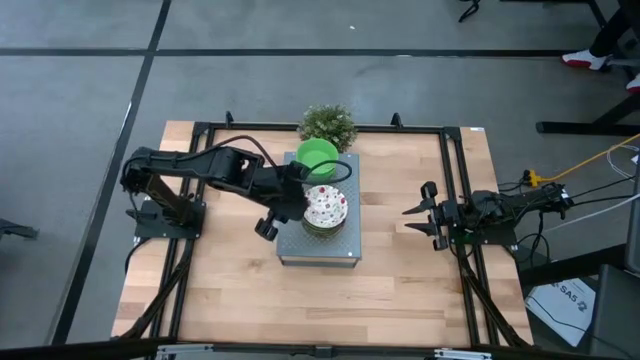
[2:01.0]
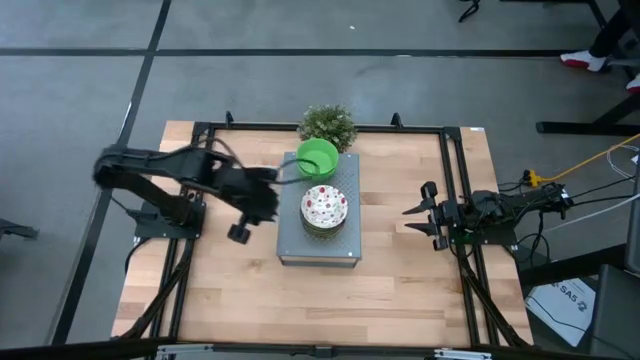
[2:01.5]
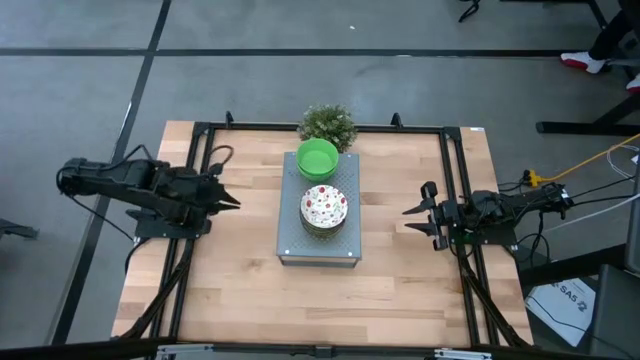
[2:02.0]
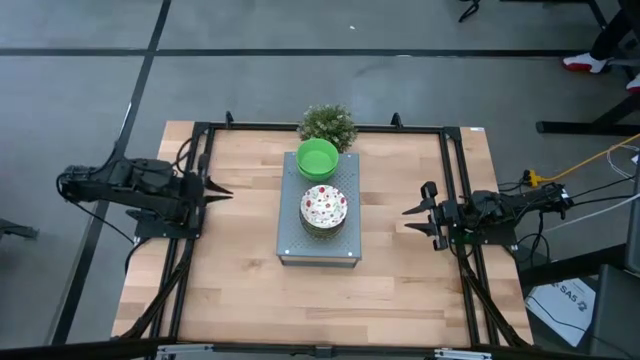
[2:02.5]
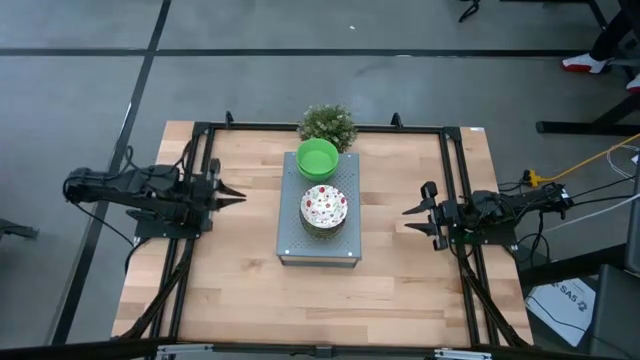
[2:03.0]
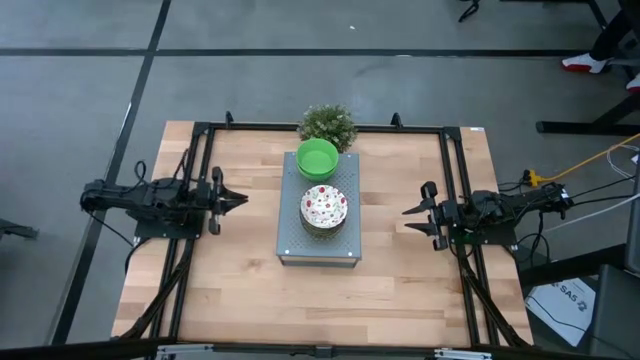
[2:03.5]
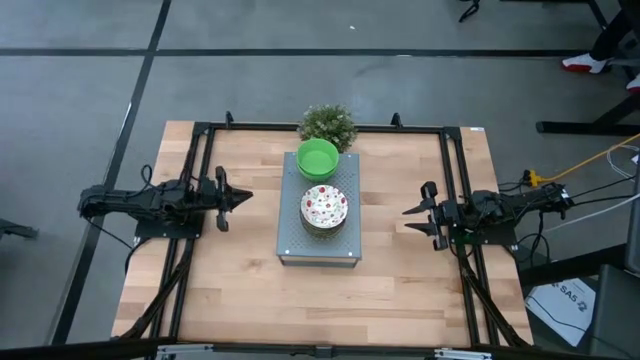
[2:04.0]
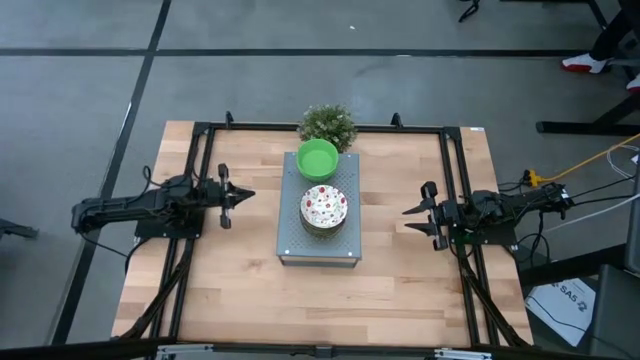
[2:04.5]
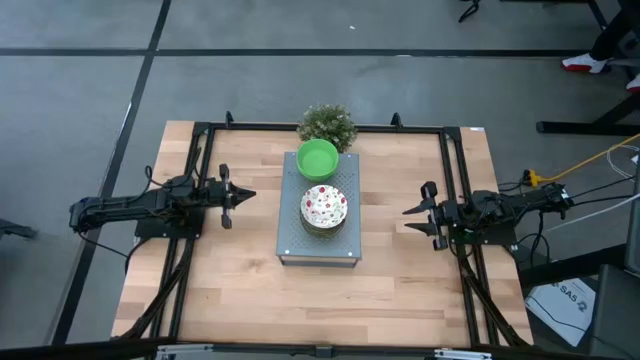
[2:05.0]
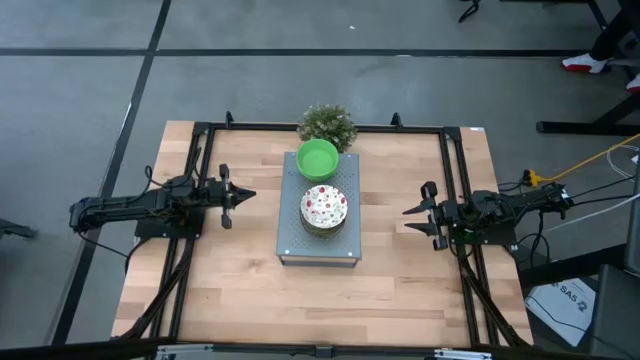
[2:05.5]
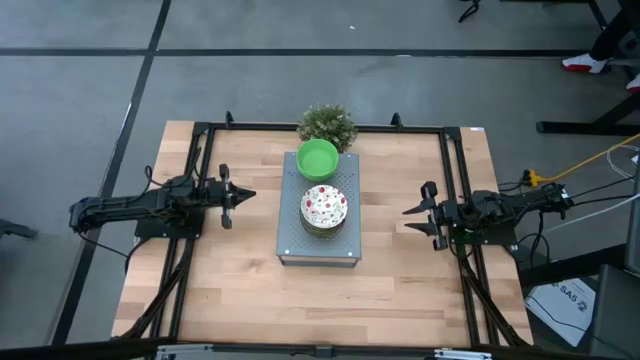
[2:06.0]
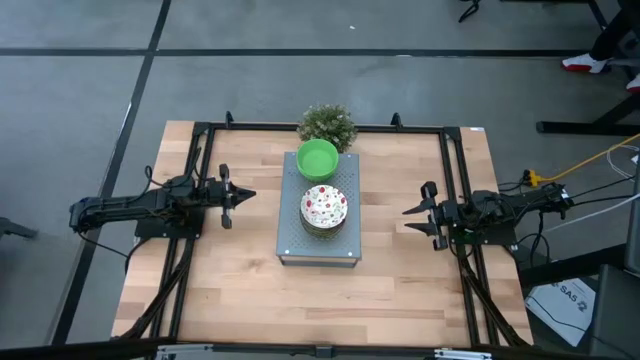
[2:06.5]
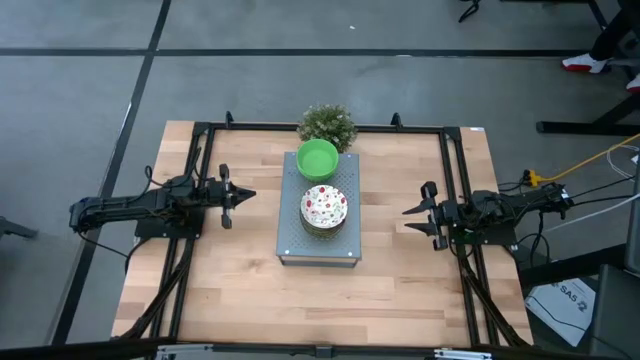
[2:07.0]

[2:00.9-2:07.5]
Task: Pick & Place Mini bowls
Return to Home Position

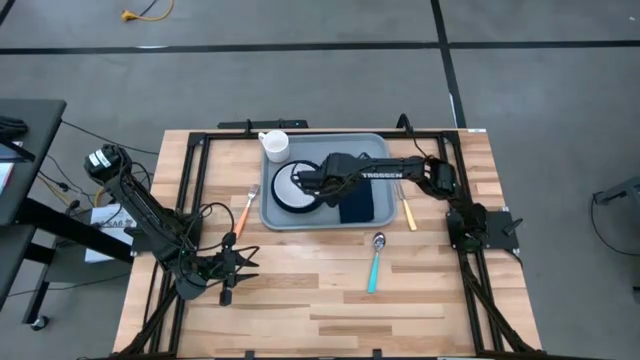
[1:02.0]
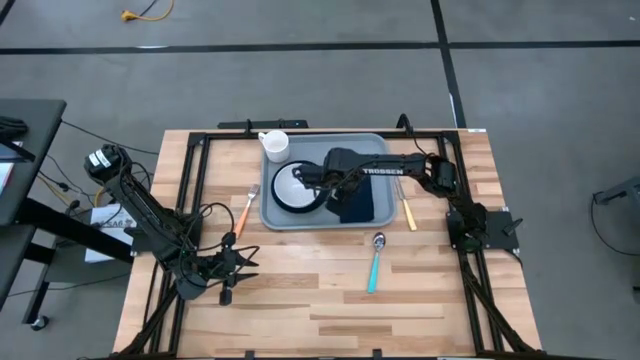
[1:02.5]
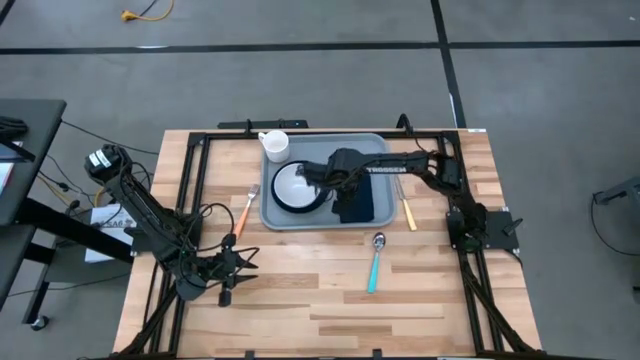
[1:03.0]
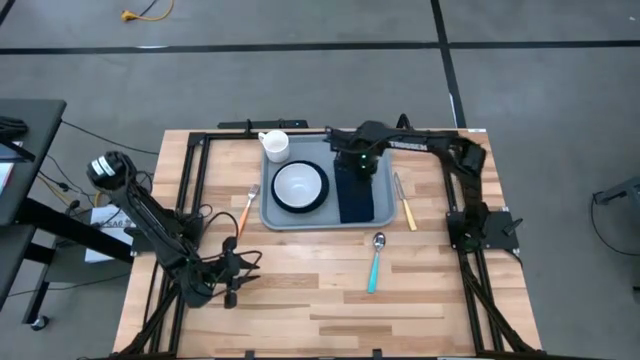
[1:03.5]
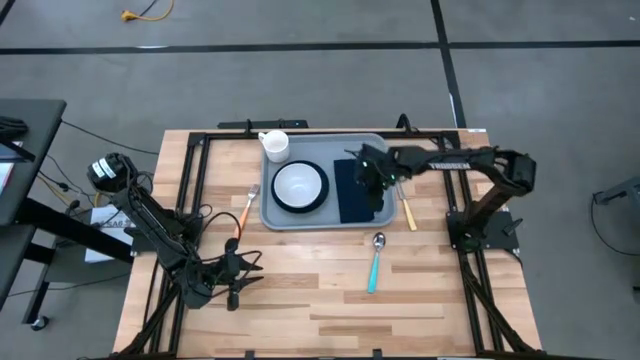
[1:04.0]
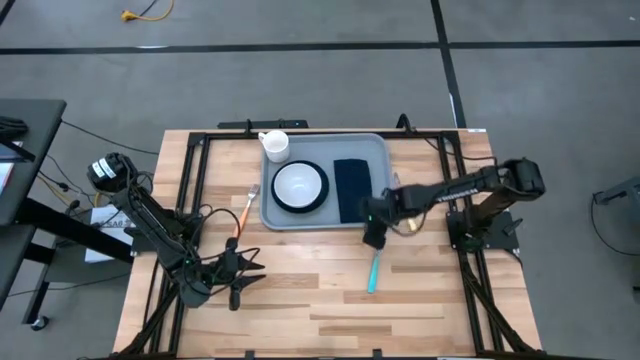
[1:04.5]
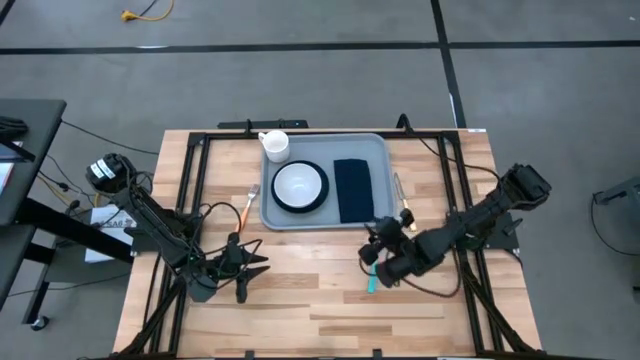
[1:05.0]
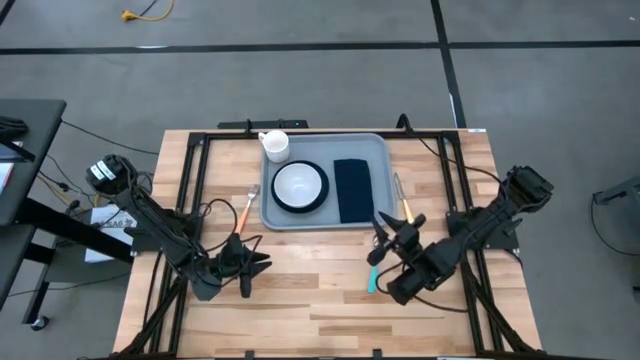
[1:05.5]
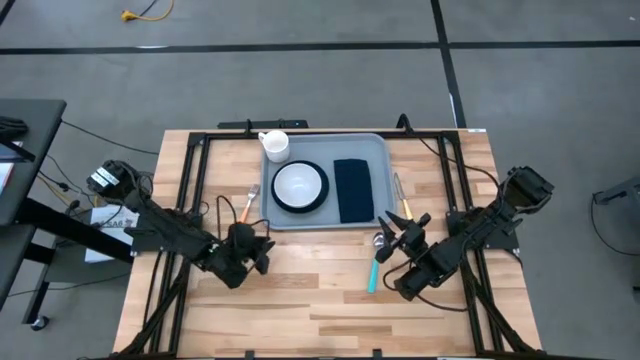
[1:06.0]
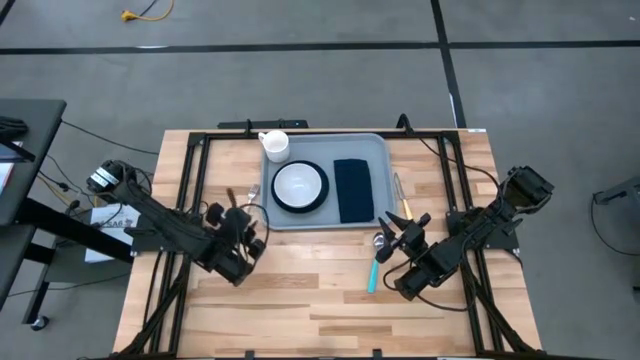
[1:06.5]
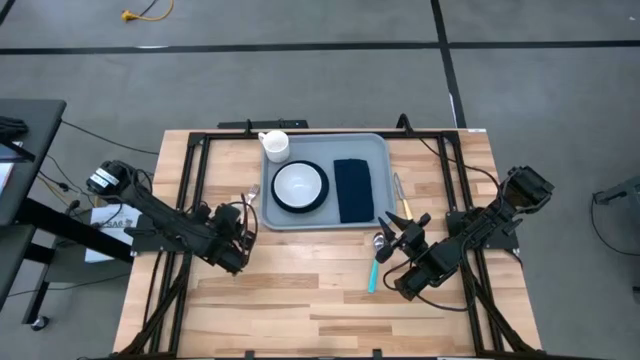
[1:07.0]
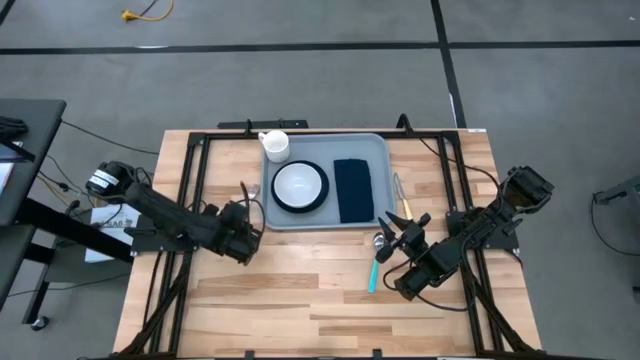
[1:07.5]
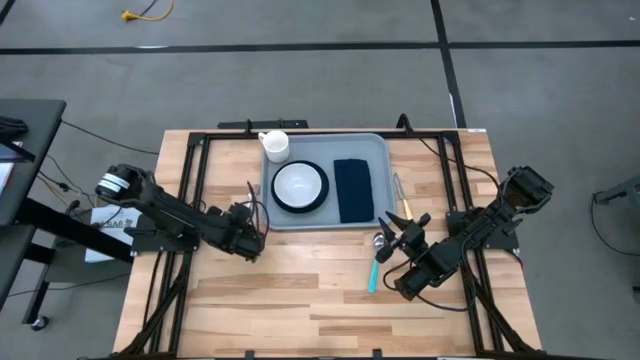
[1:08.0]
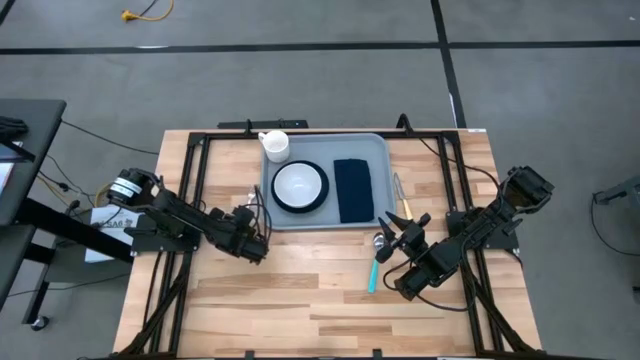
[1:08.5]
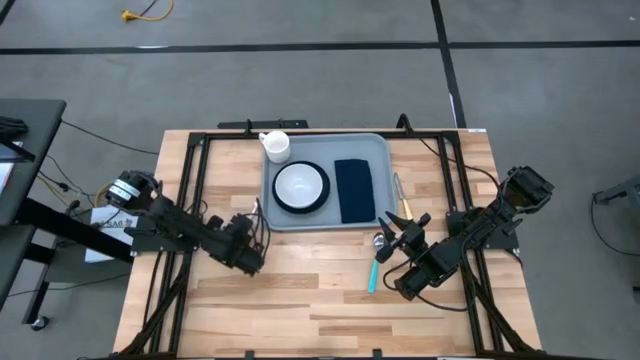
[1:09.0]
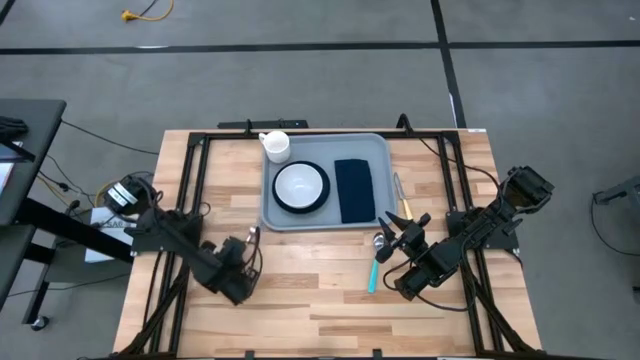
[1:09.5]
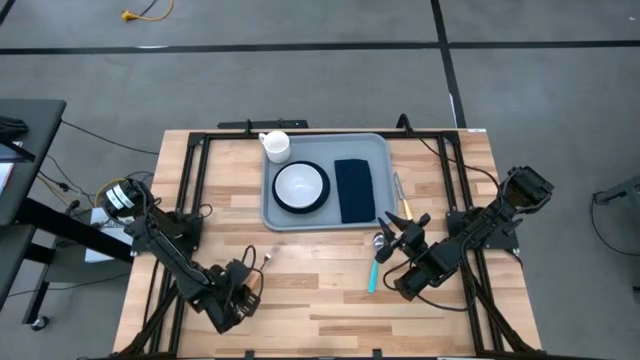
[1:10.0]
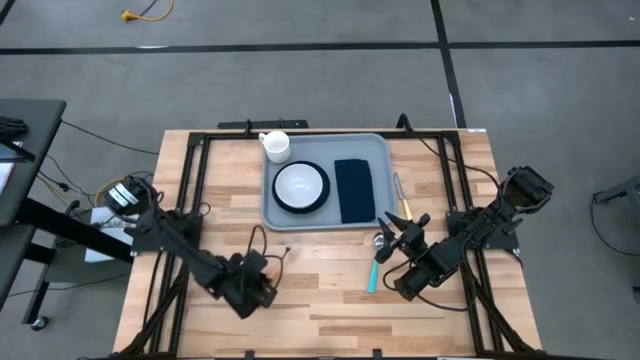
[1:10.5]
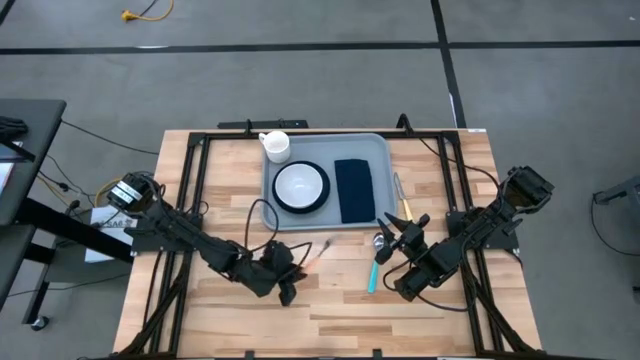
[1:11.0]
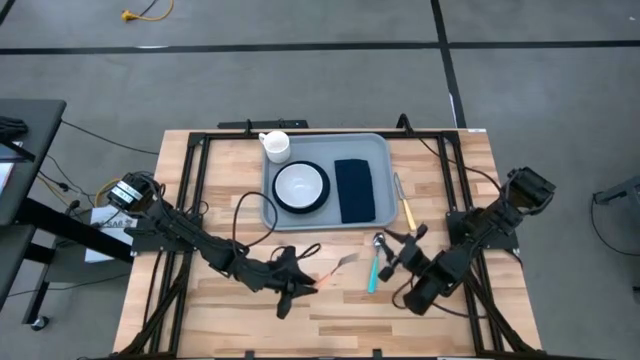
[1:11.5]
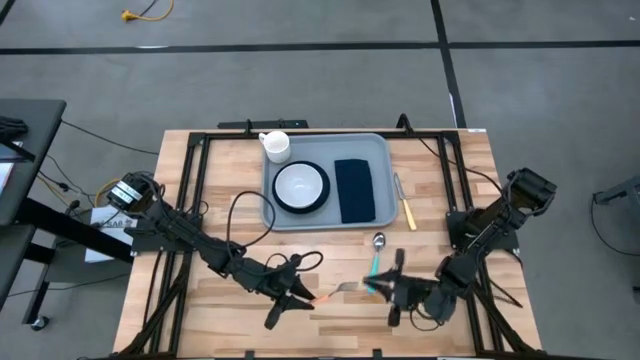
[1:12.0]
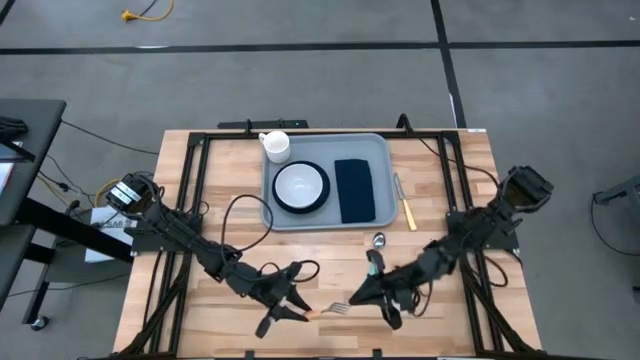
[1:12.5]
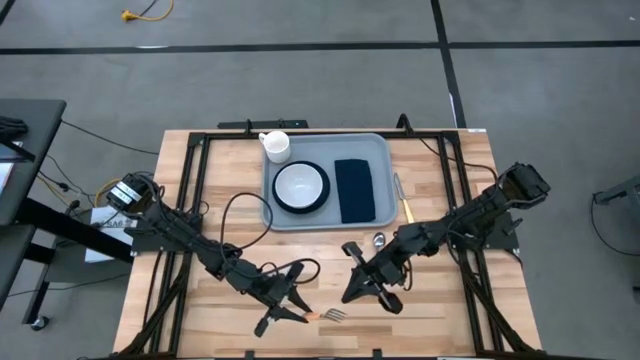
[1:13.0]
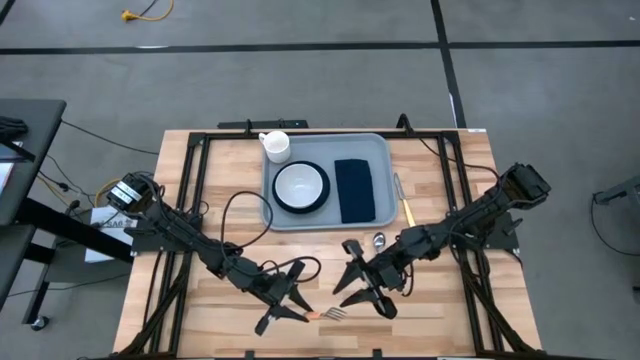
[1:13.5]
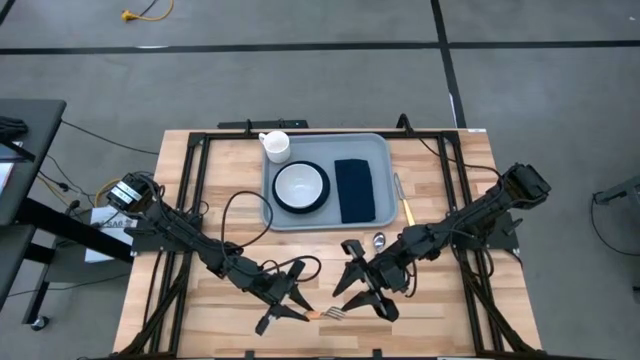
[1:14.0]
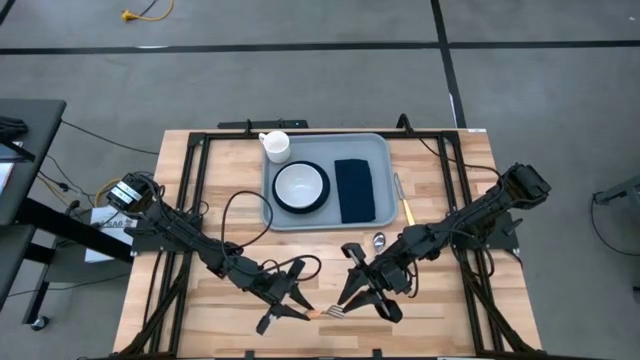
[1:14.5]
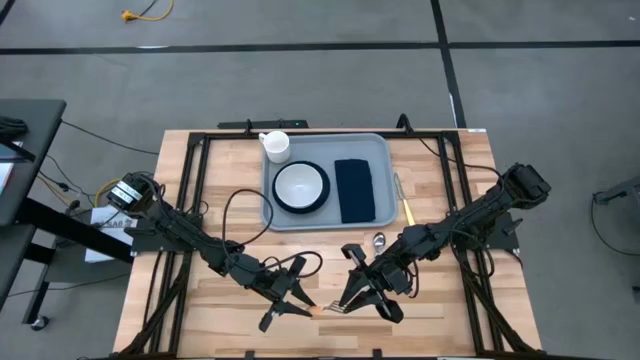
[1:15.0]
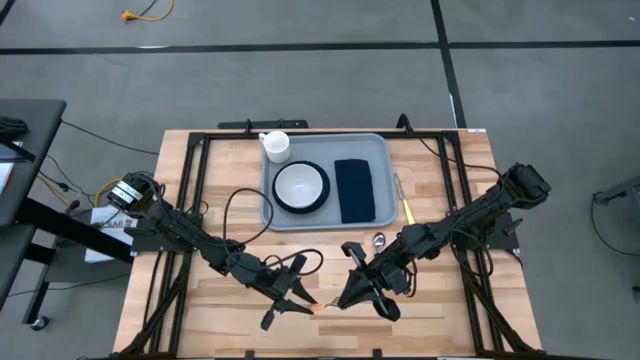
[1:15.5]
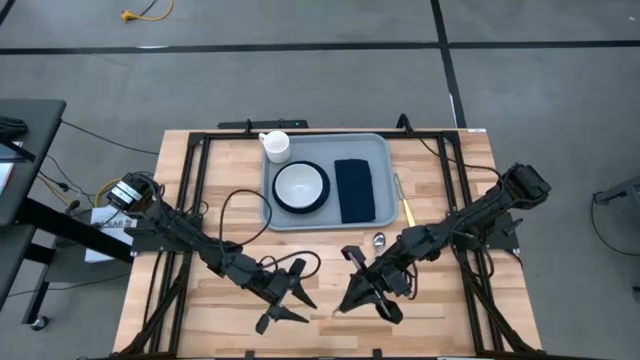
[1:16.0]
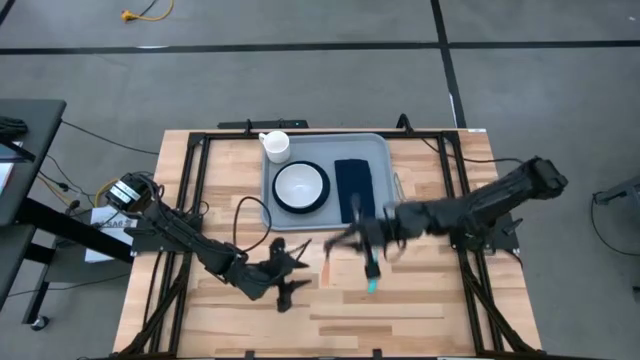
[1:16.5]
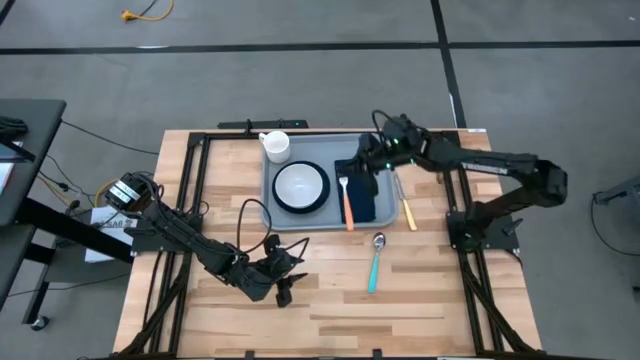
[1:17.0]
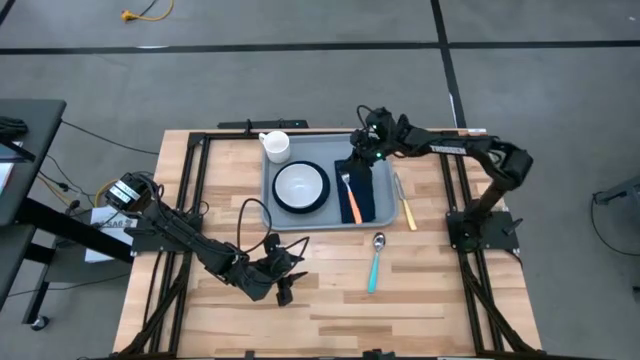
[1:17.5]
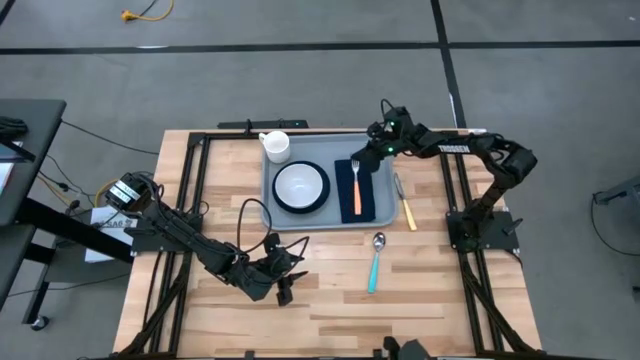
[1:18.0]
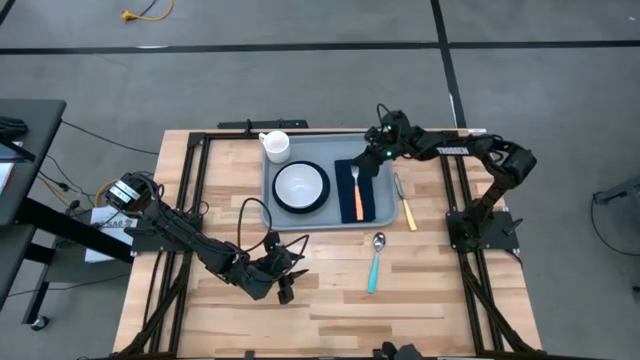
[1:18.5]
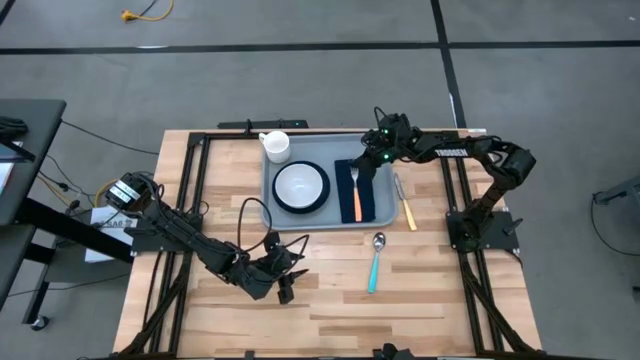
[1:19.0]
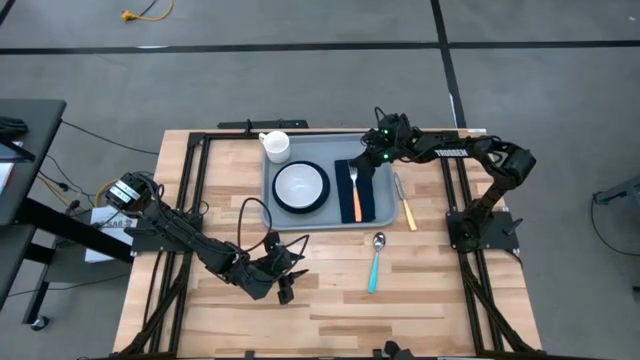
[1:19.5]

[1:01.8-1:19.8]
Task: Set up tray
Put the orange fork on the blue napkin on the gray tray
